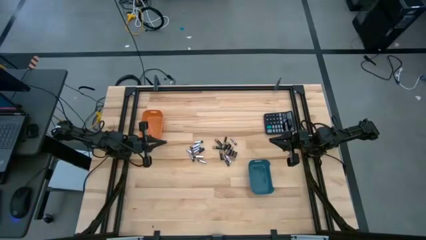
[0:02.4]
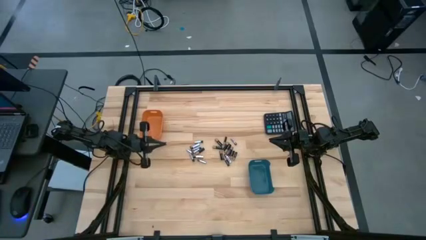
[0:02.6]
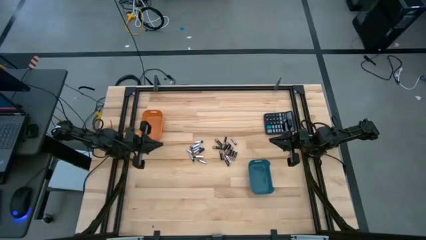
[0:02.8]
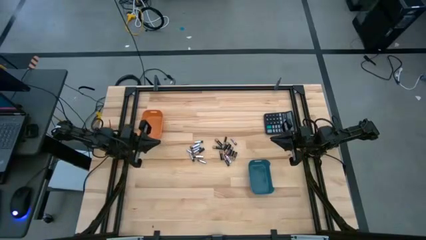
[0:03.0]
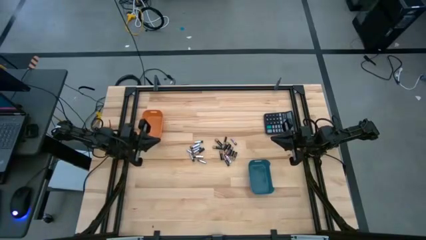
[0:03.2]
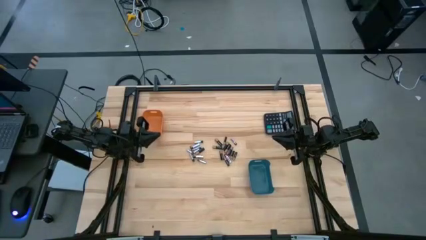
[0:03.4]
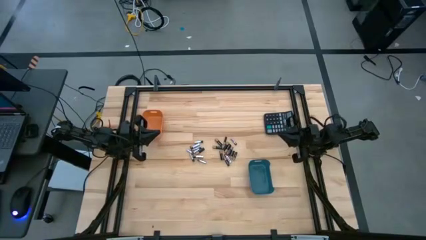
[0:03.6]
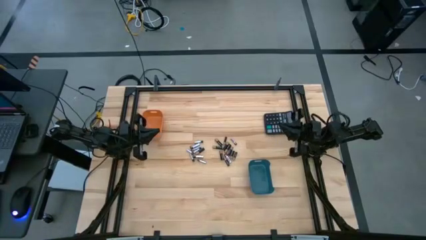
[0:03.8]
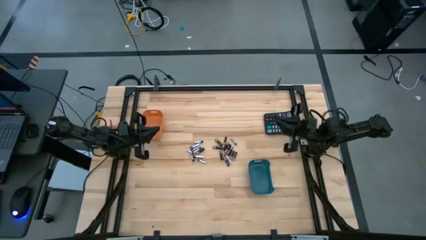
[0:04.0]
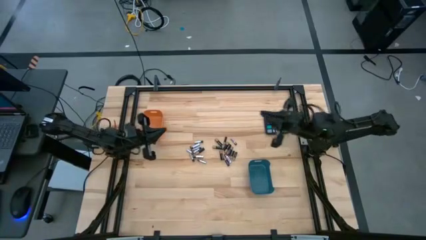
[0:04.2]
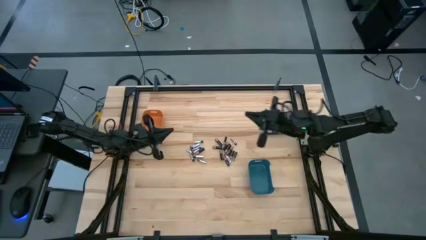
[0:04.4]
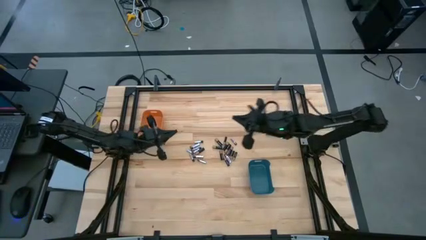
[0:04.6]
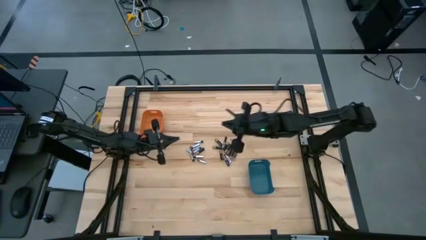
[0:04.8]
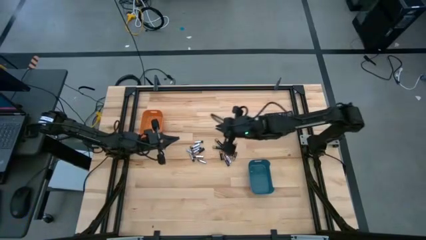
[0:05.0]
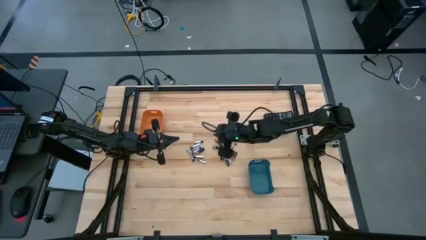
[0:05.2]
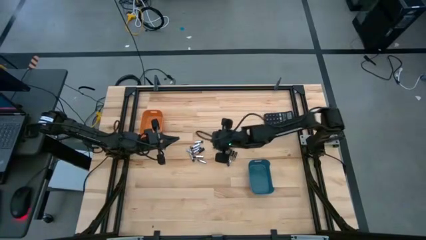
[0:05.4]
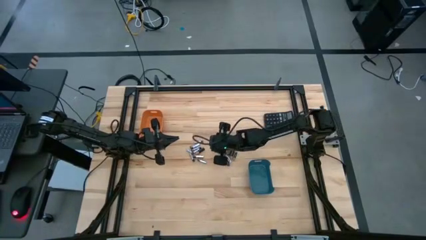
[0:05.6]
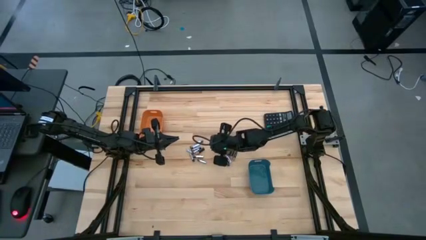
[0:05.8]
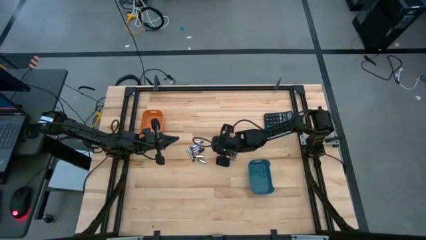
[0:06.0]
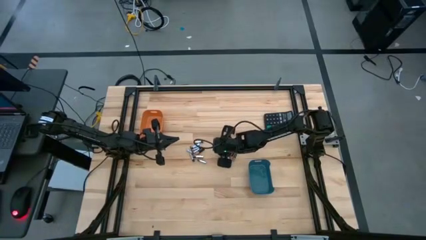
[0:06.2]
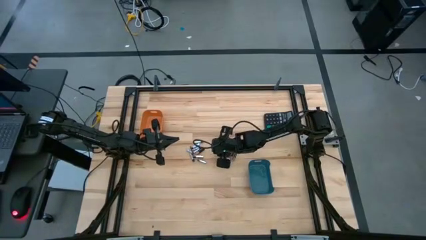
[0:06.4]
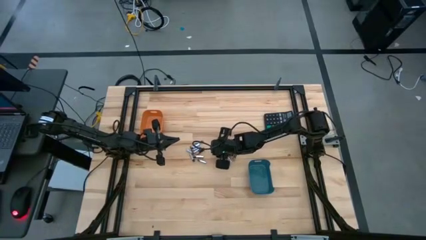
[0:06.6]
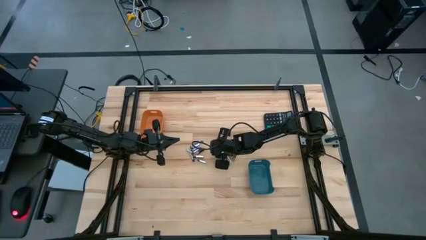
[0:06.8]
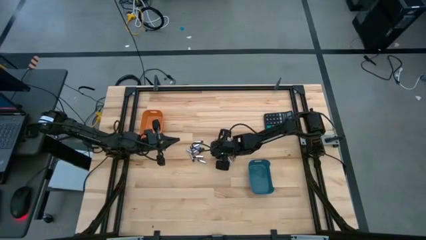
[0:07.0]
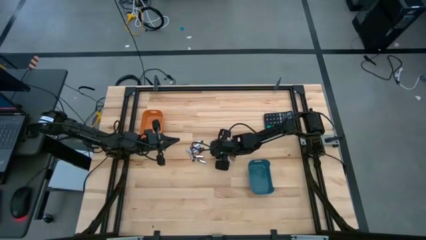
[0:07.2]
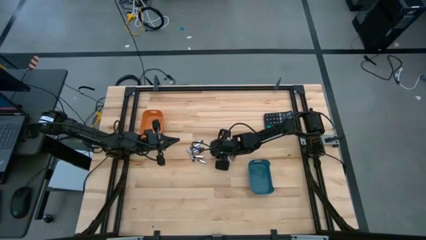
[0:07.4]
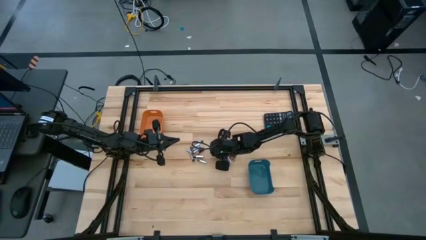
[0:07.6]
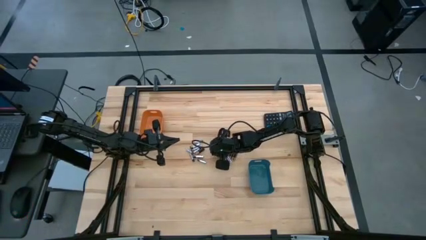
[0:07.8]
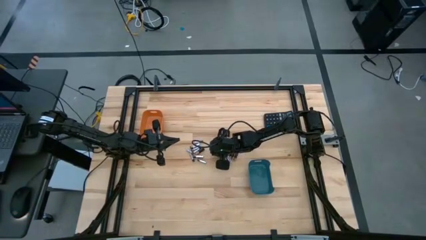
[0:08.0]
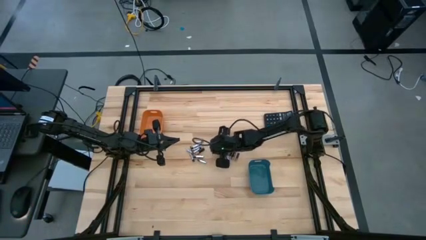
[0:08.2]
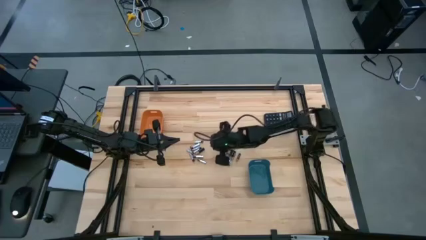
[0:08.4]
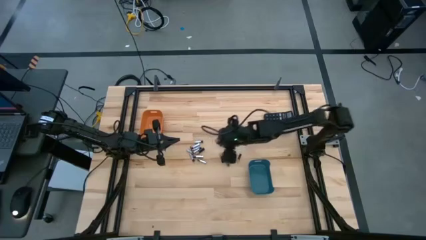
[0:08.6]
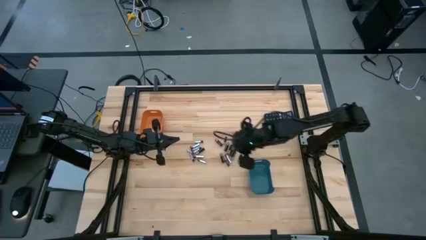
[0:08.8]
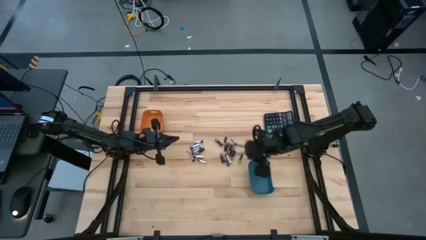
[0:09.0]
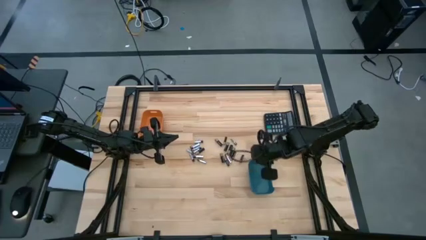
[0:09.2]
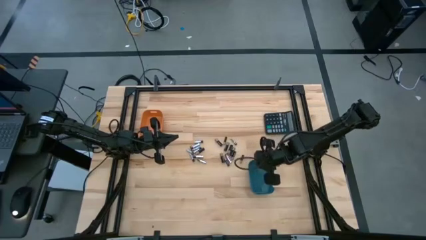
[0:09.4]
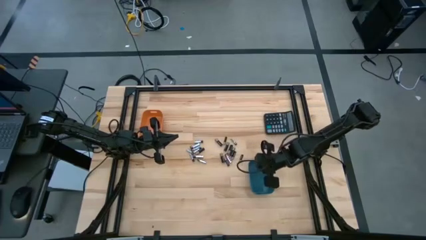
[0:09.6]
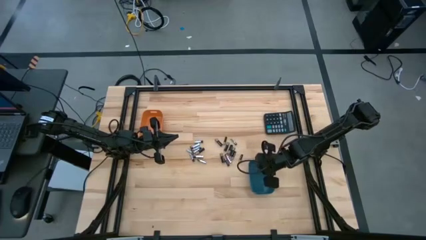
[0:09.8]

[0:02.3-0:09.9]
Task: Sort batteries
Put the black battery into the blue bin

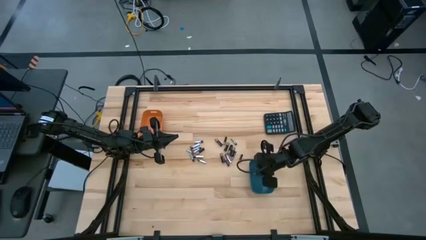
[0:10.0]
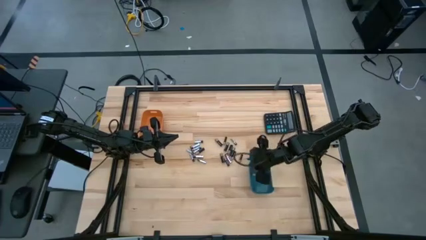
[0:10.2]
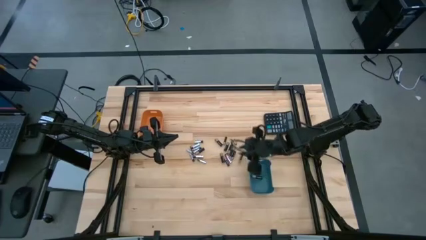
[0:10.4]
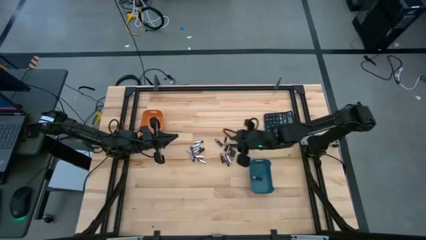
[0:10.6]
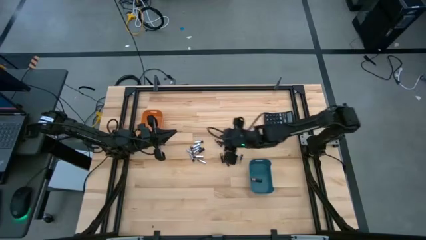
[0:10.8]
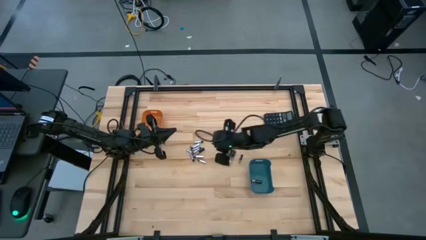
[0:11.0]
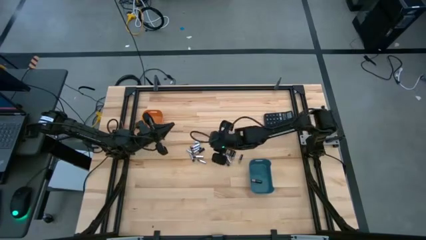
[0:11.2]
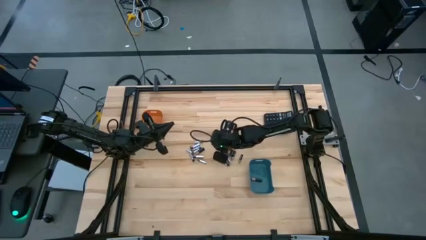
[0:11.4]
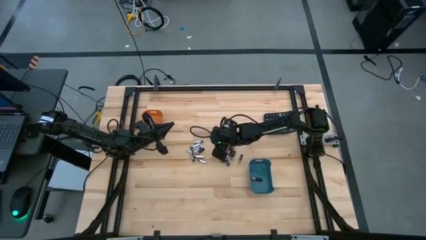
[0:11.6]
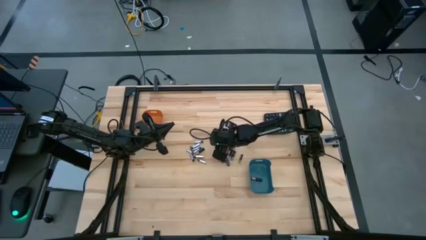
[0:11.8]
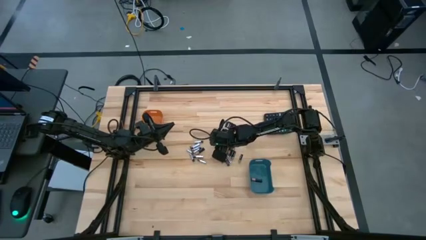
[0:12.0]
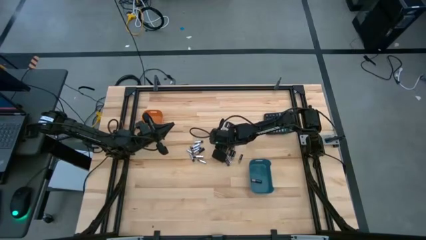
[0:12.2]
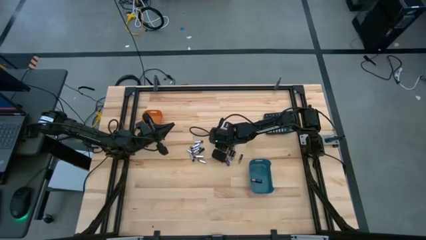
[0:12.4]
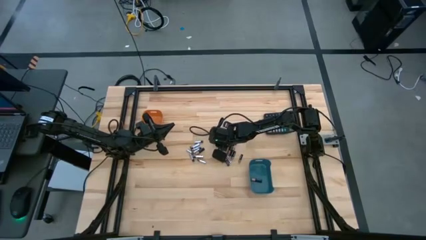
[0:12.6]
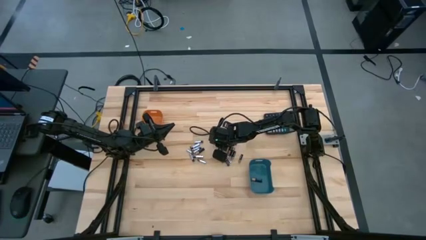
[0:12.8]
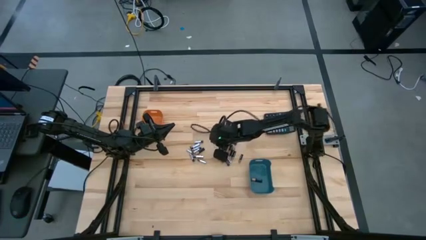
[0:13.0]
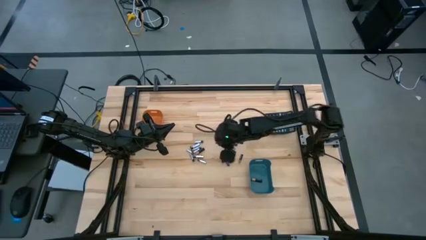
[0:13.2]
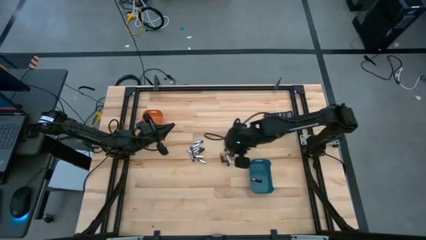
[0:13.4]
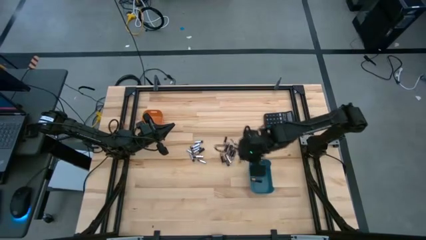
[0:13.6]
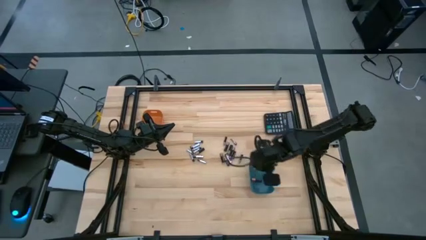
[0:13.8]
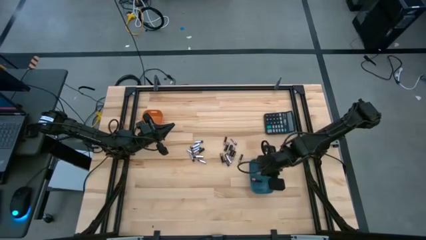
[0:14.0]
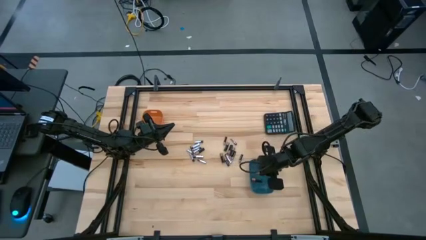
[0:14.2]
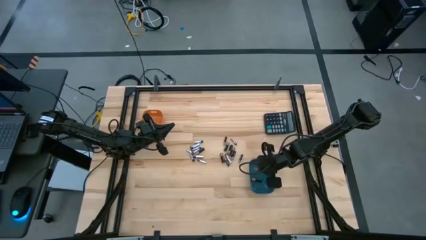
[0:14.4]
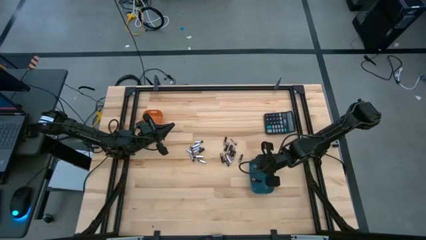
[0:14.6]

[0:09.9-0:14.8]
Put the black battery into the blue bin
